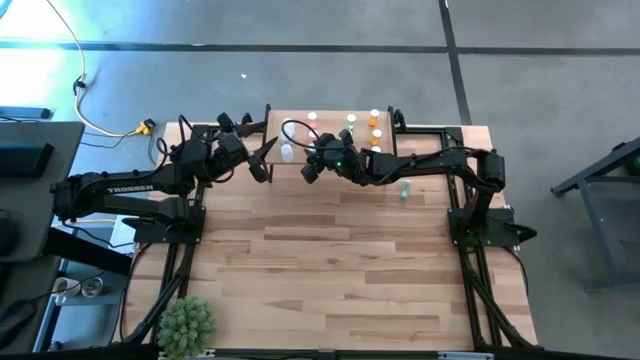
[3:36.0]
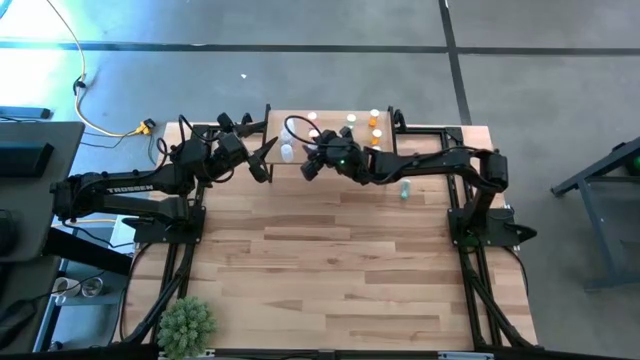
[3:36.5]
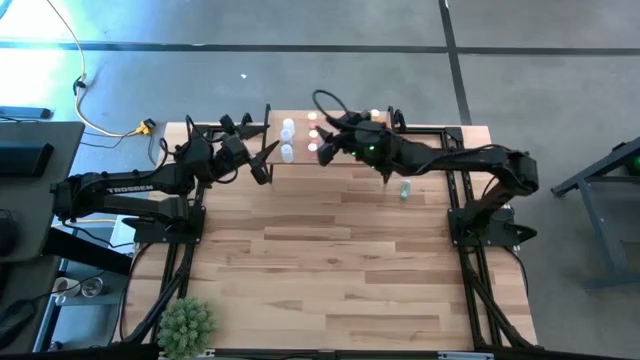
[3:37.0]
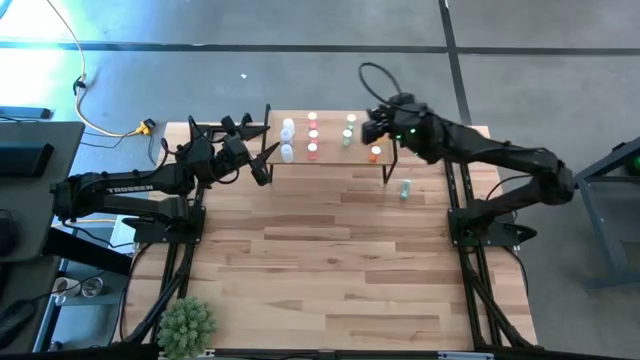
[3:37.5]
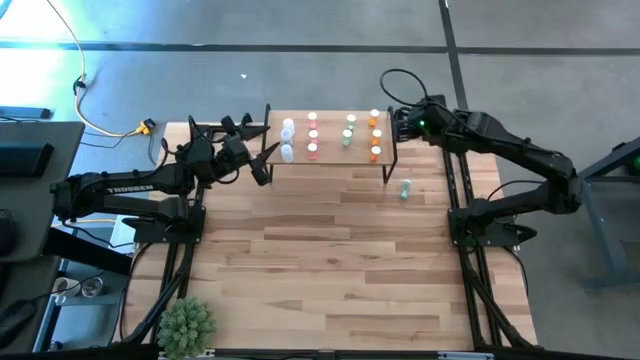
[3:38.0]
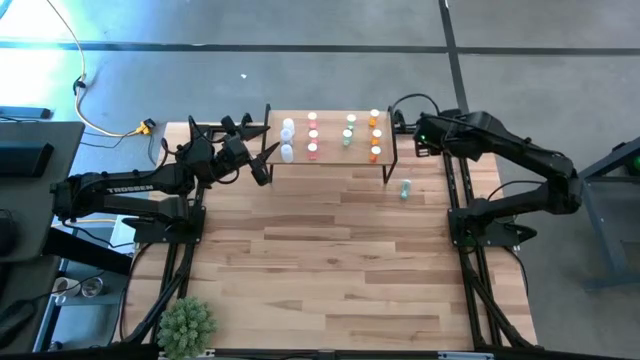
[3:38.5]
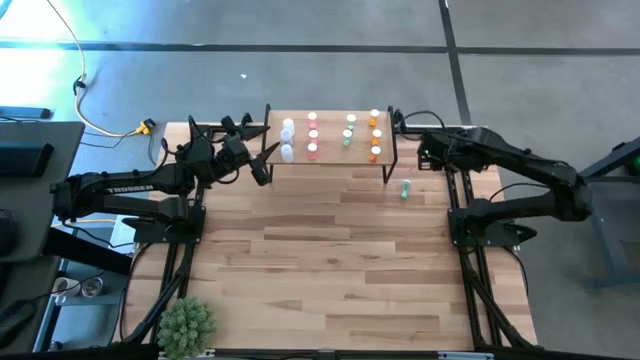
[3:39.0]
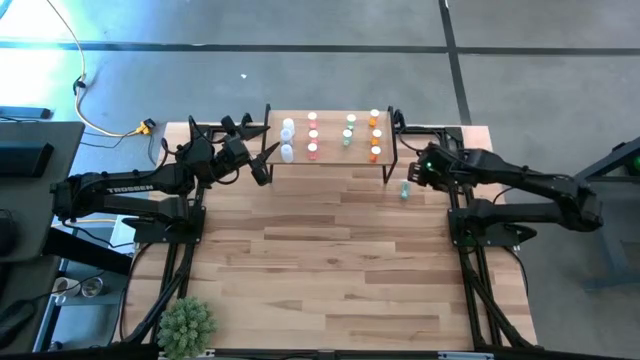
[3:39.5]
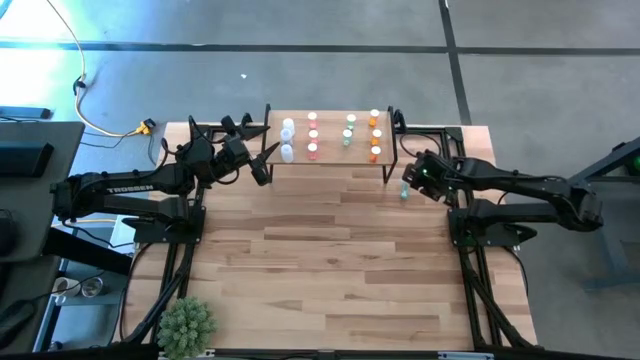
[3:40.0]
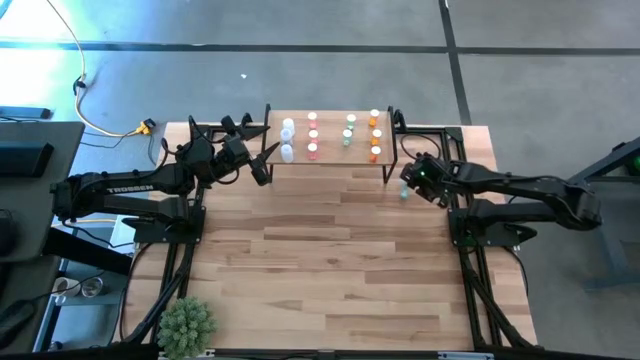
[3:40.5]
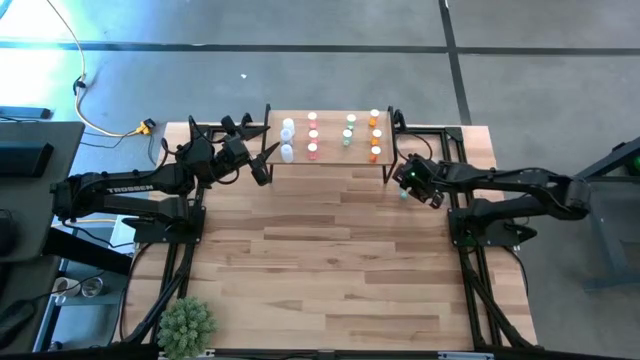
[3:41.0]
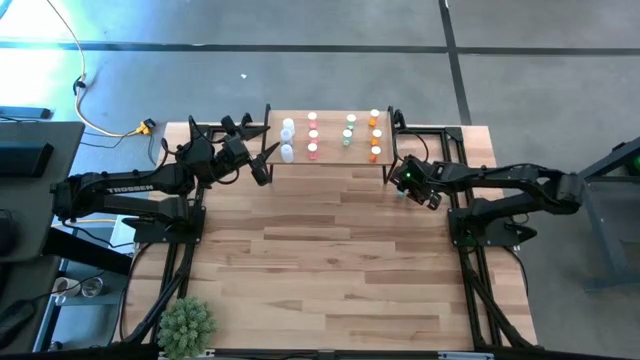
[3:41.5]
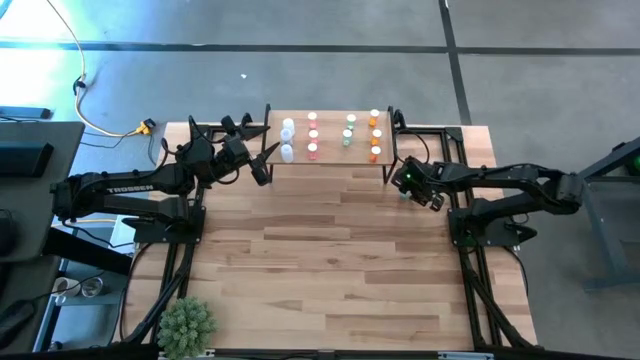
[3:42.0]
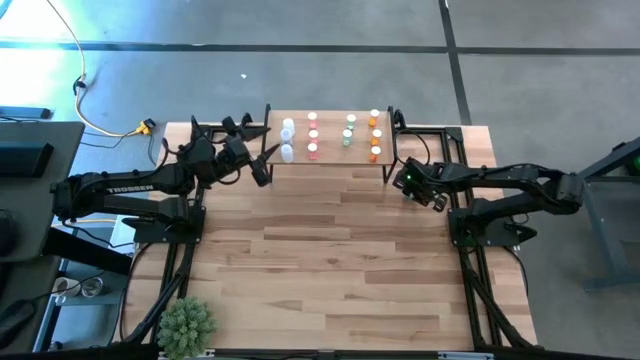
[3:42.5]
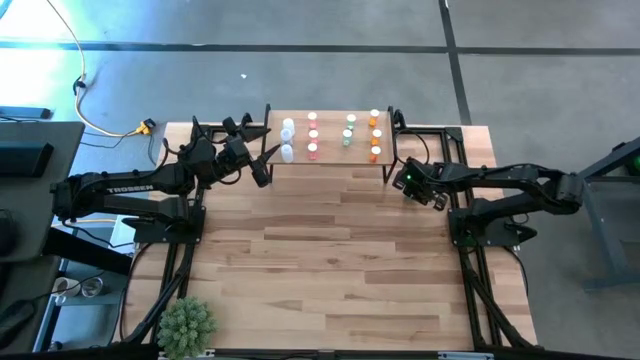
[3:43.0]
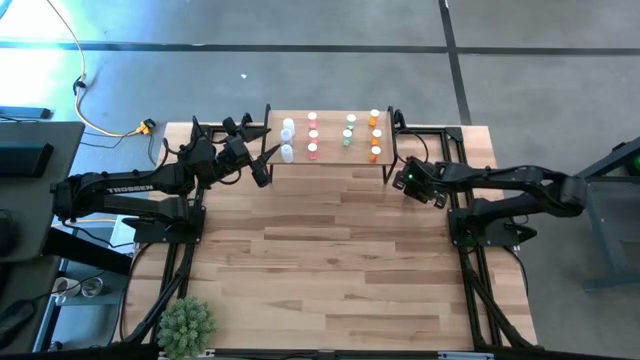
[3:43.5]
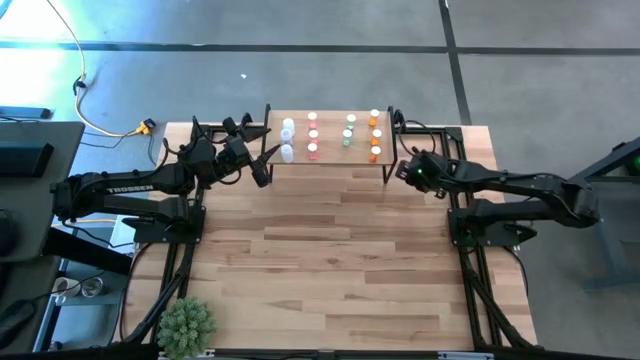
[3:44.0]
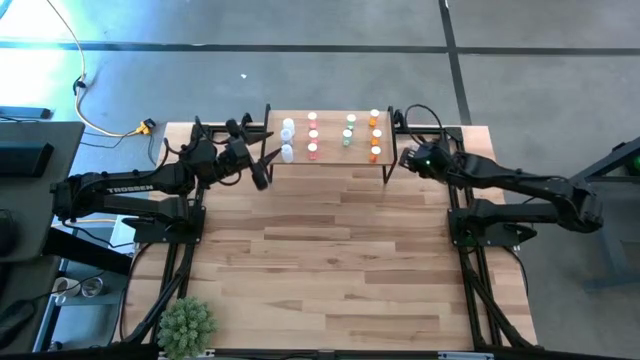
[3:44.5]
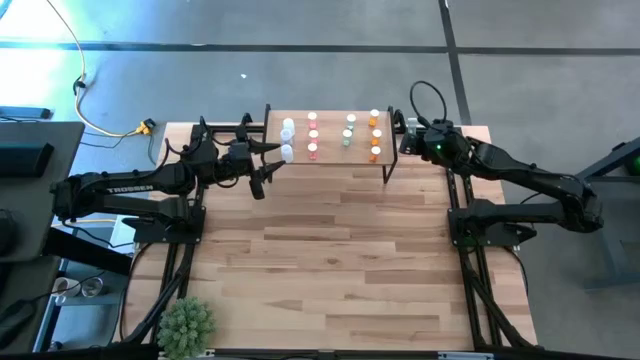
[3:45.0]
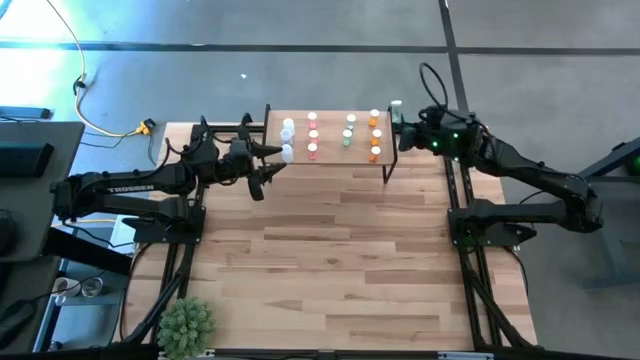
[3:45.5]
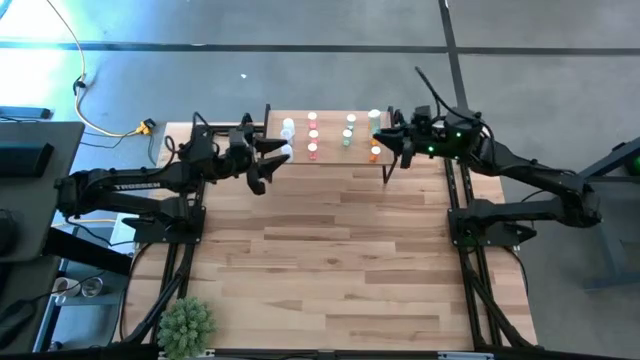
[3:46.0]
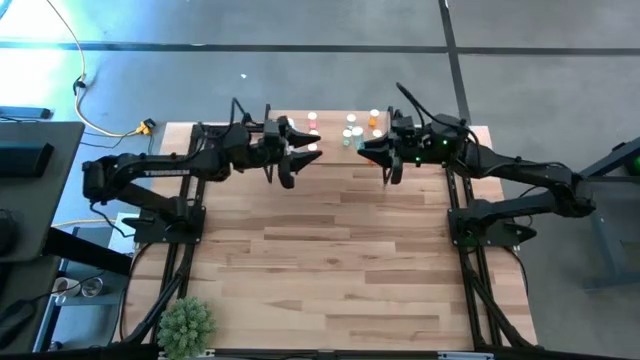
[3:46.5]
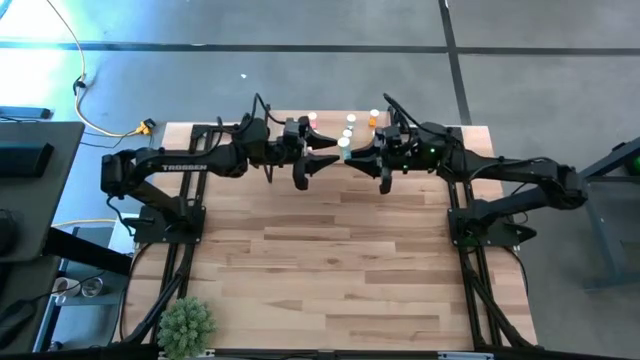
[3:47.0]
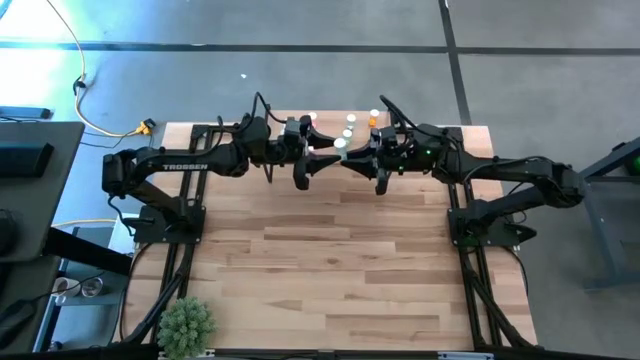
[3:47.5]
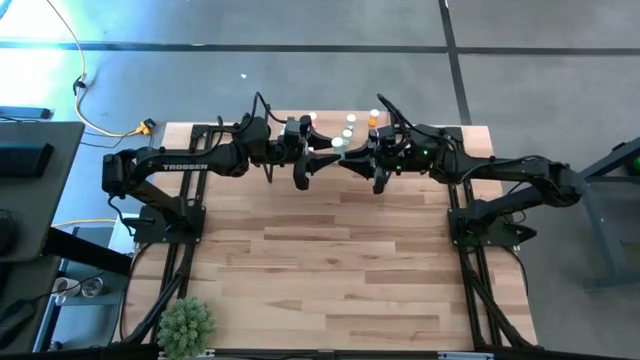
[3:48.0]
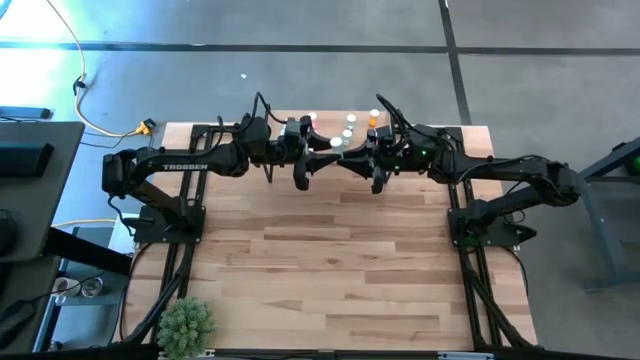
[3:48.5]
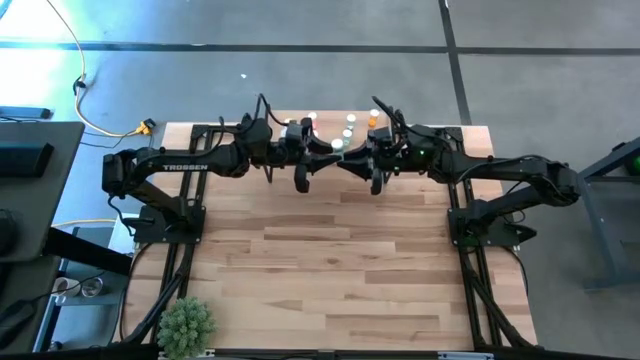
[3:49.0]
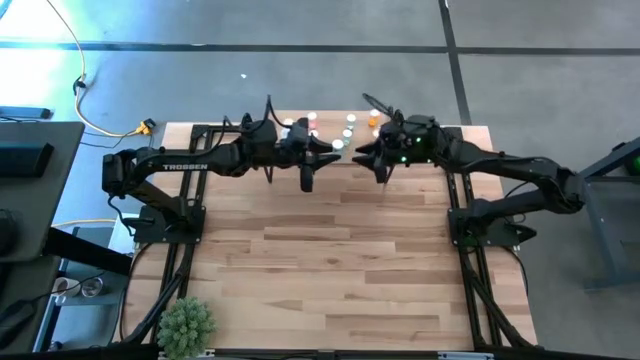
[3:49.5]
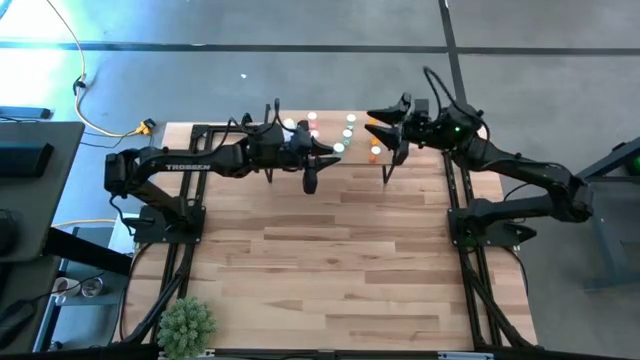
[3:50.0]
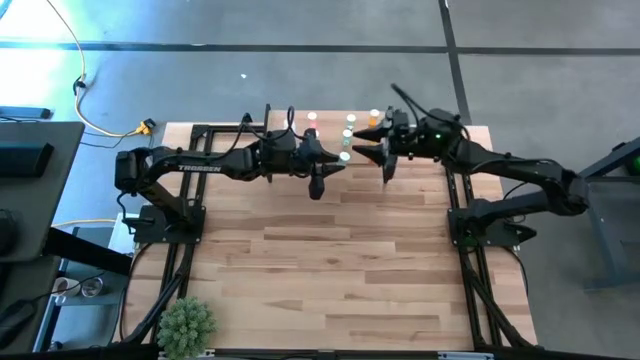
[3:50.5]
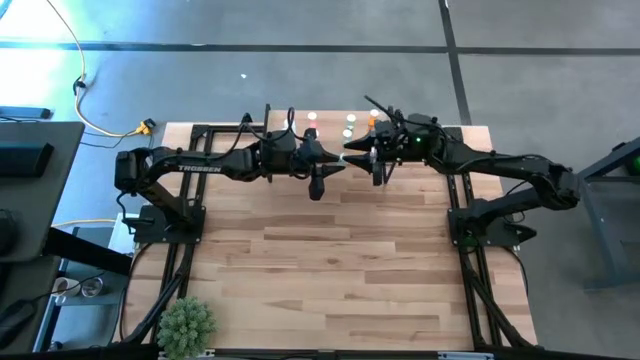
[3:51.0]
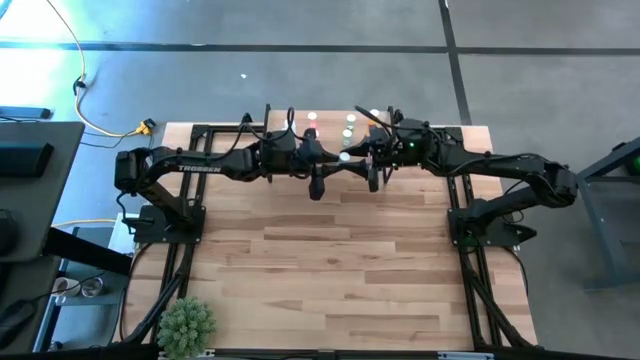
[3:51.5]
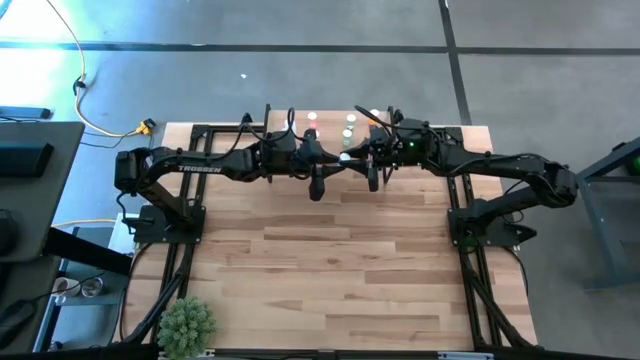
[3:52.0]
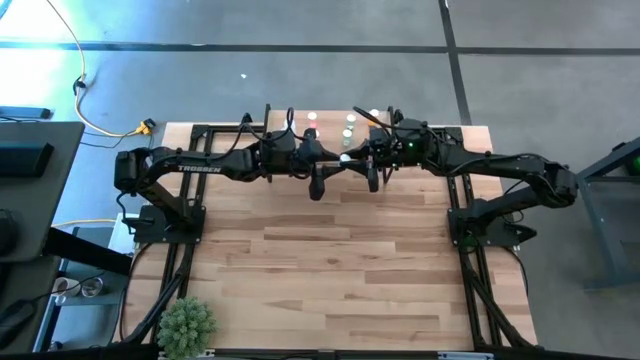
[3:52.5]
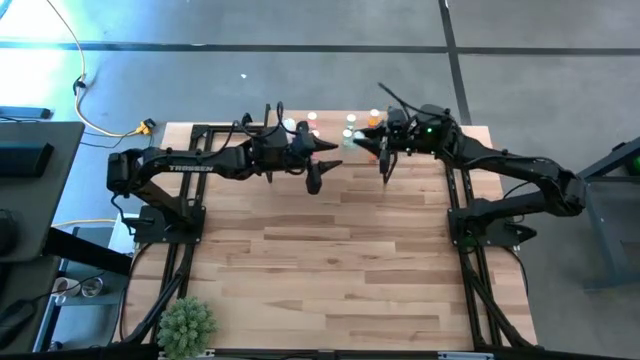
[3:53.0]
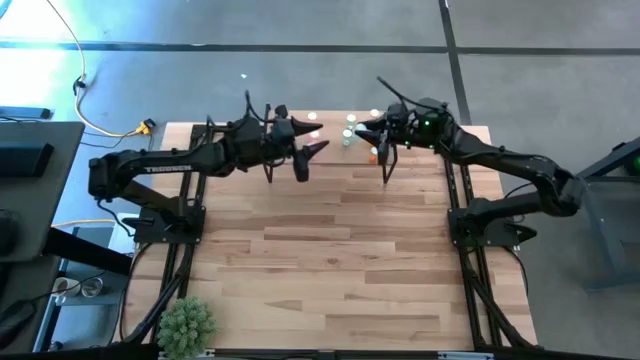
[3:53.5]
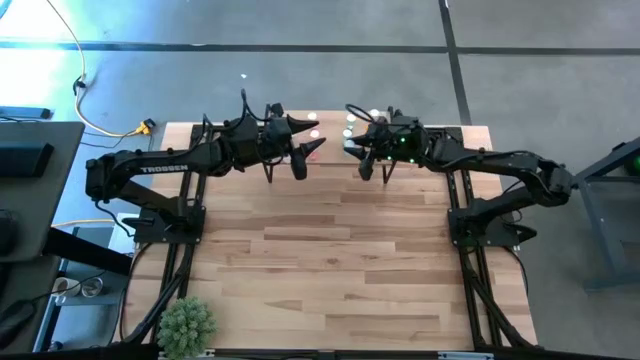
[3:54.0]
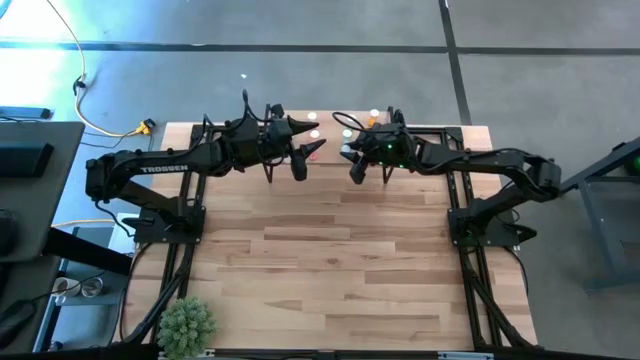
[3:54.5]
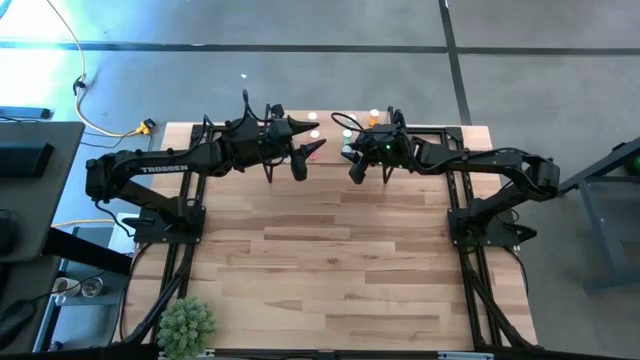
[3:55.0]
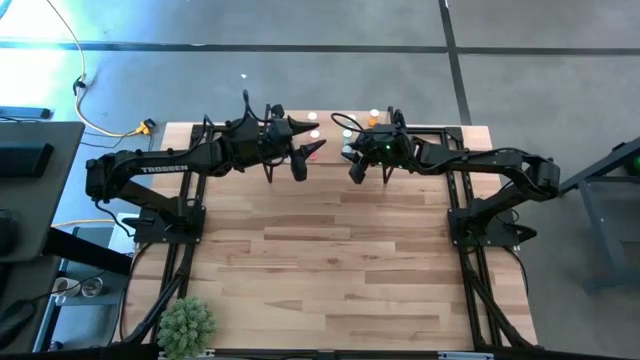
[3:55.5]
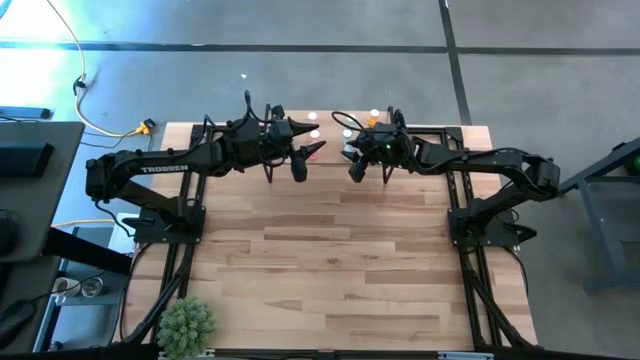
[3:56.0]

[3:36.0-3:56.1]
Task: Pick and place medicine bottles onto shelf by color
Put the blue pill bottle on the shelf aligned with the other blue pill bottles
